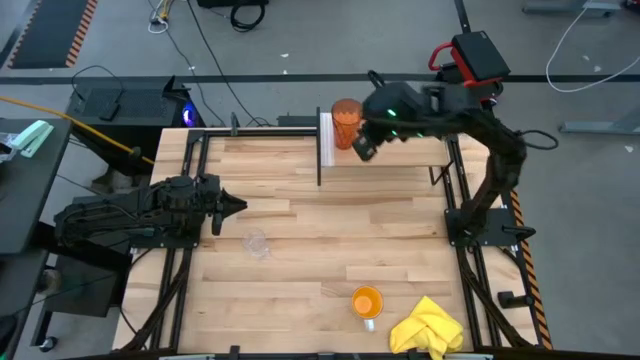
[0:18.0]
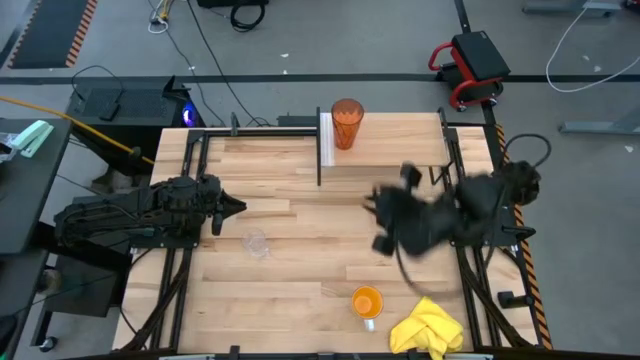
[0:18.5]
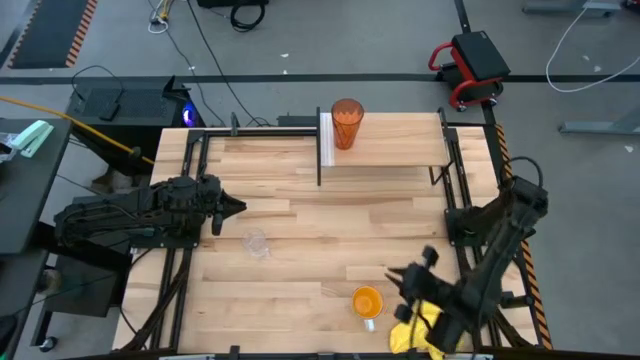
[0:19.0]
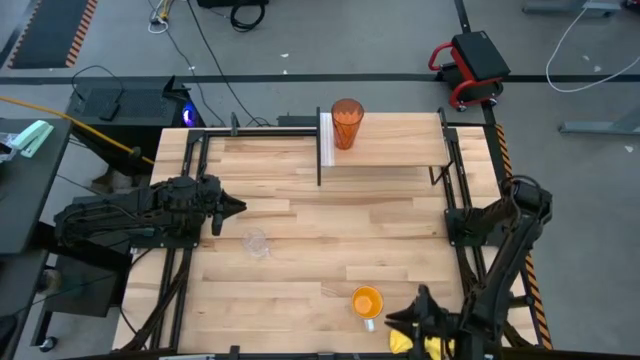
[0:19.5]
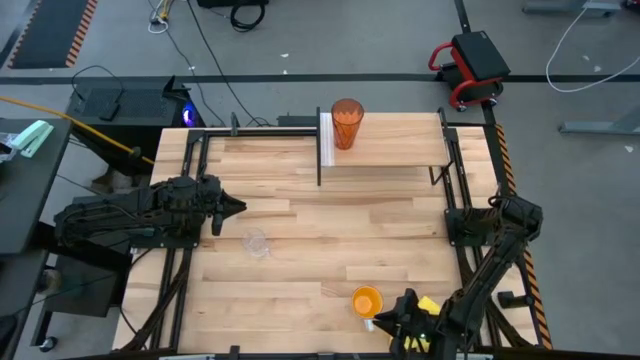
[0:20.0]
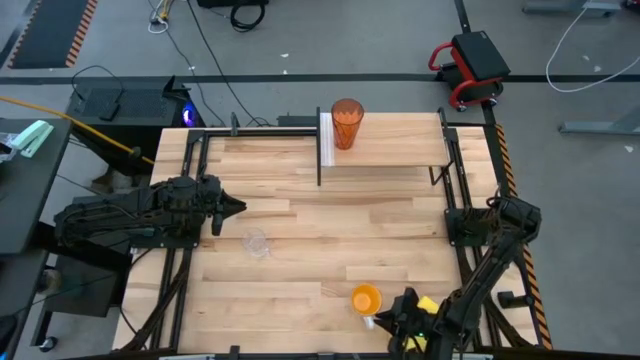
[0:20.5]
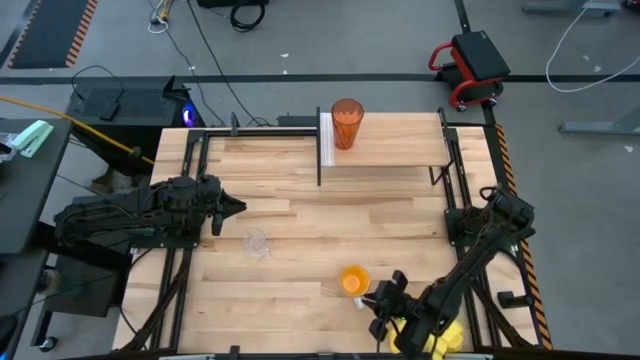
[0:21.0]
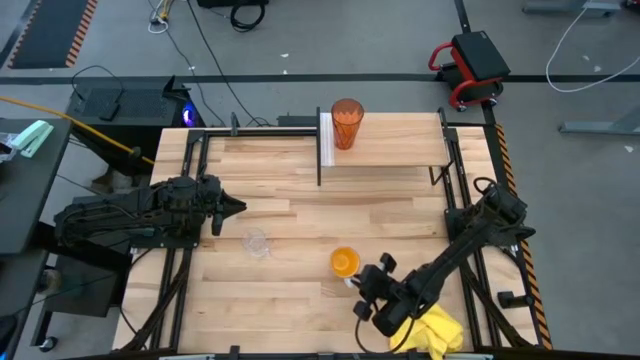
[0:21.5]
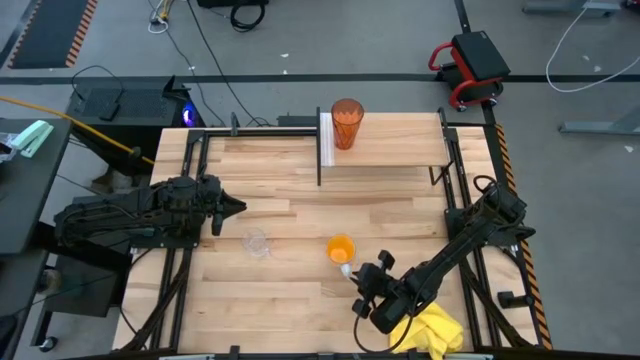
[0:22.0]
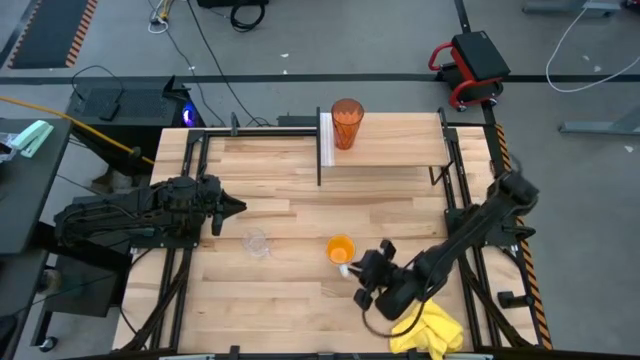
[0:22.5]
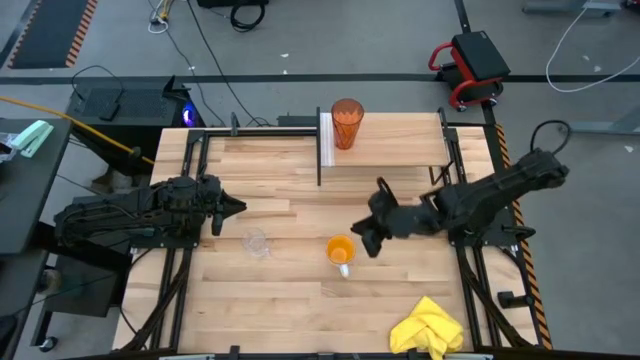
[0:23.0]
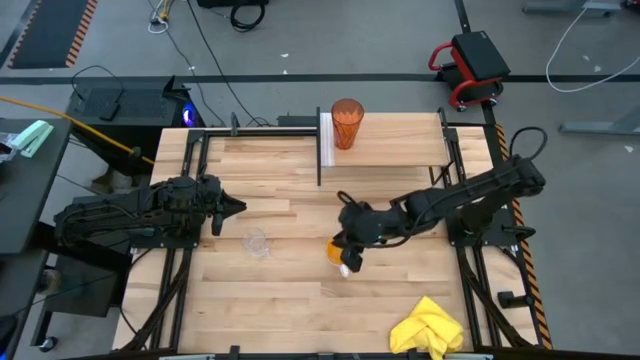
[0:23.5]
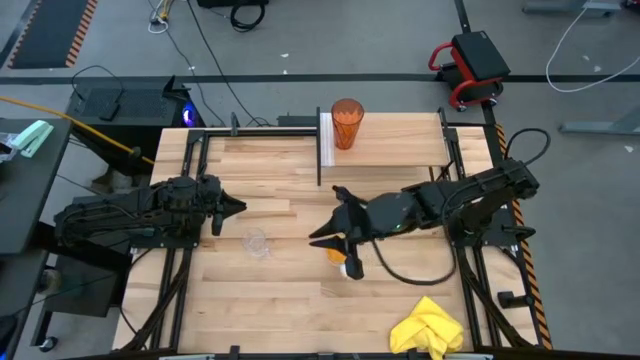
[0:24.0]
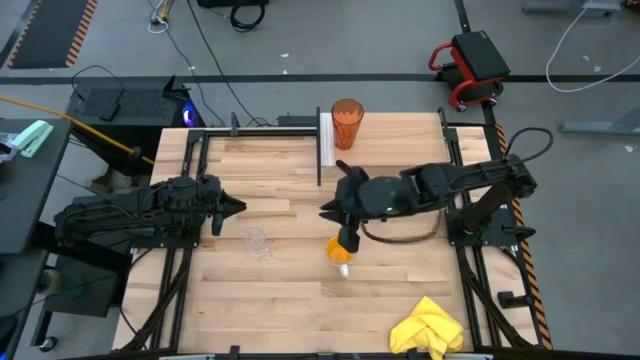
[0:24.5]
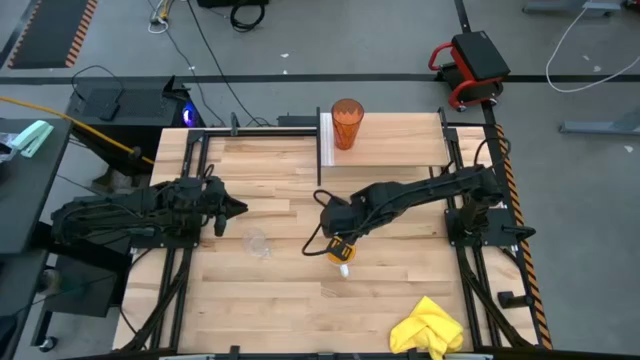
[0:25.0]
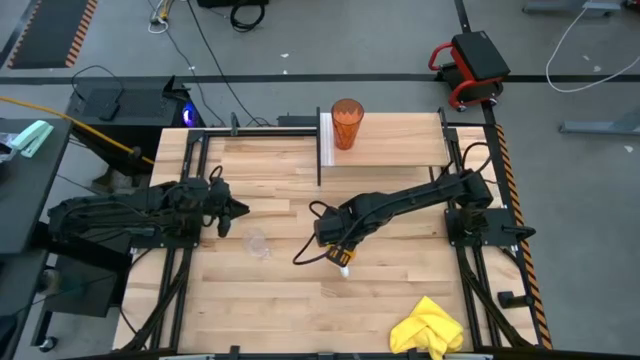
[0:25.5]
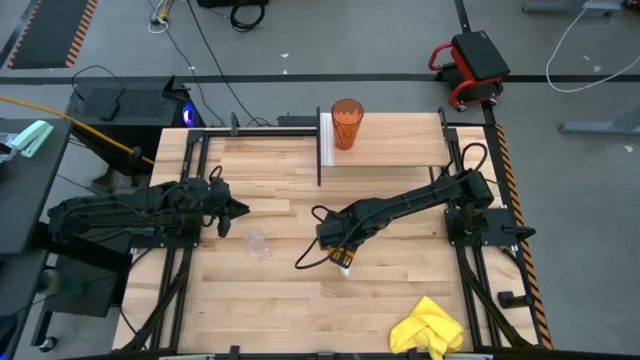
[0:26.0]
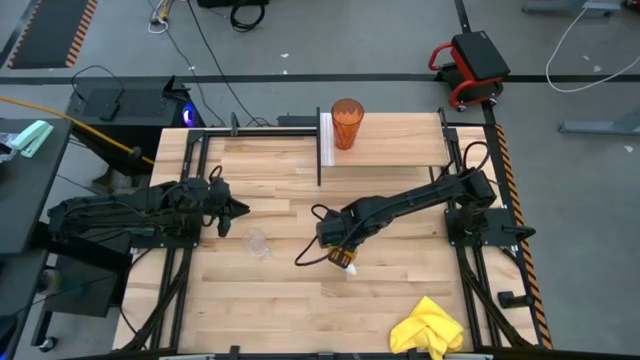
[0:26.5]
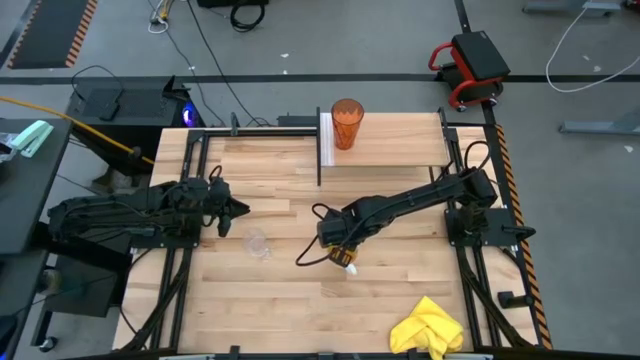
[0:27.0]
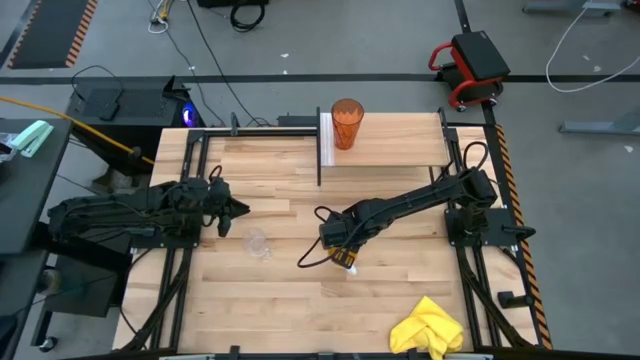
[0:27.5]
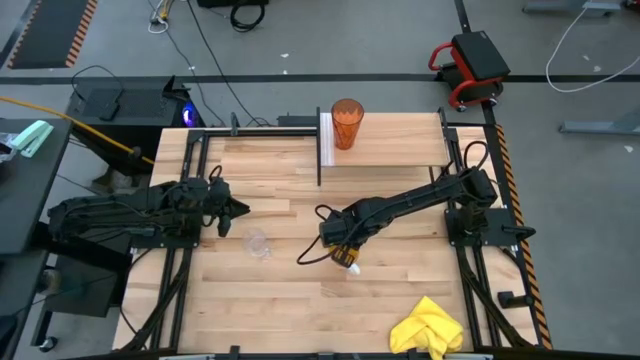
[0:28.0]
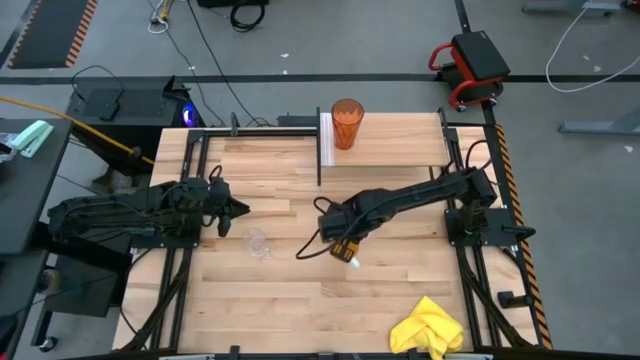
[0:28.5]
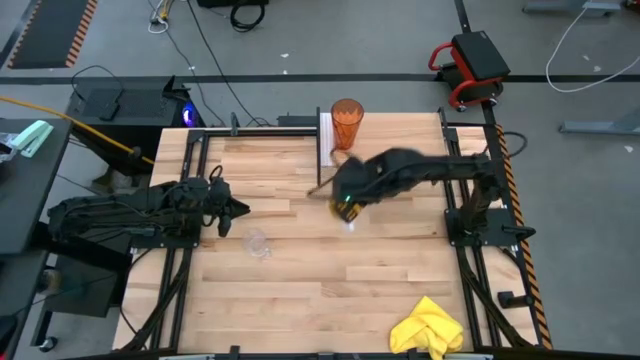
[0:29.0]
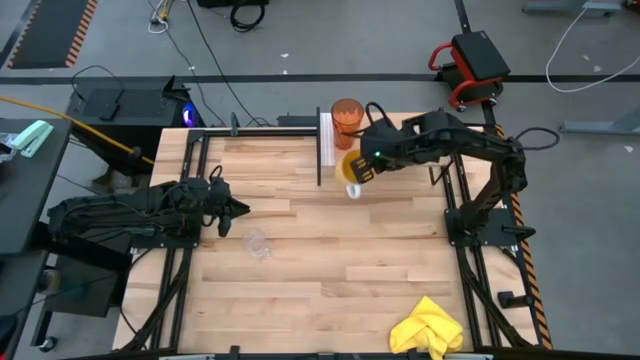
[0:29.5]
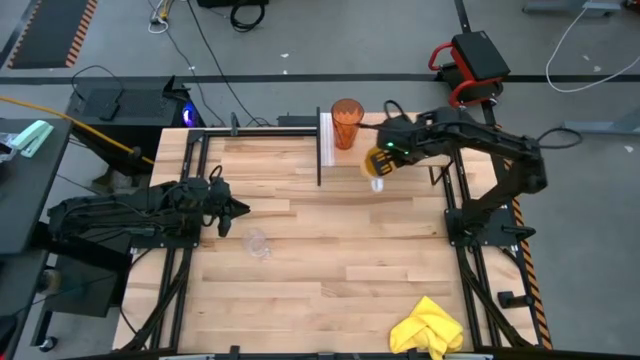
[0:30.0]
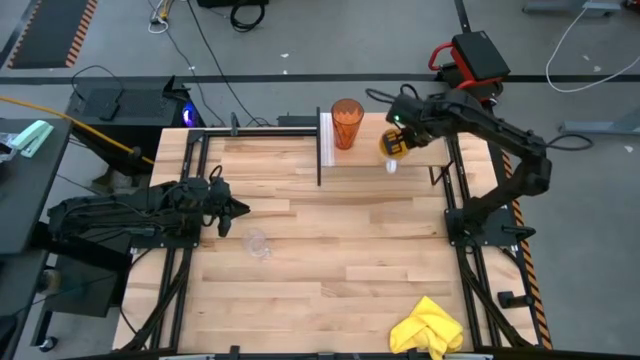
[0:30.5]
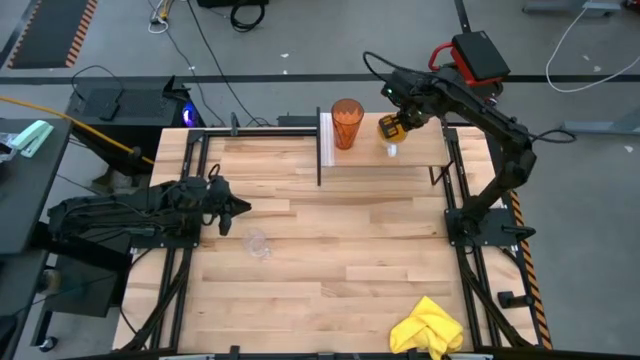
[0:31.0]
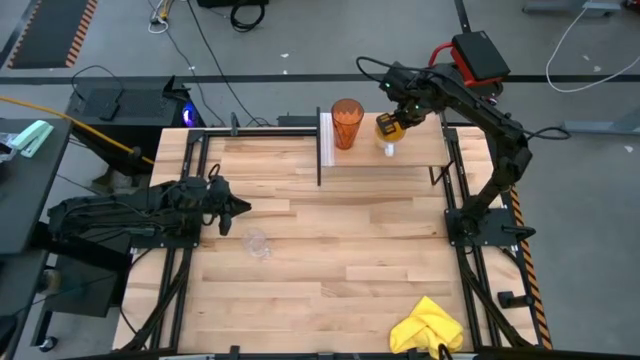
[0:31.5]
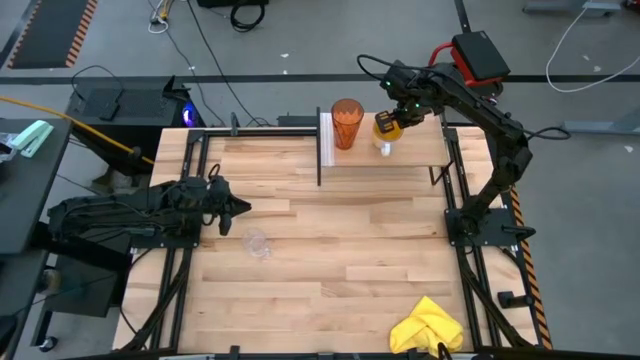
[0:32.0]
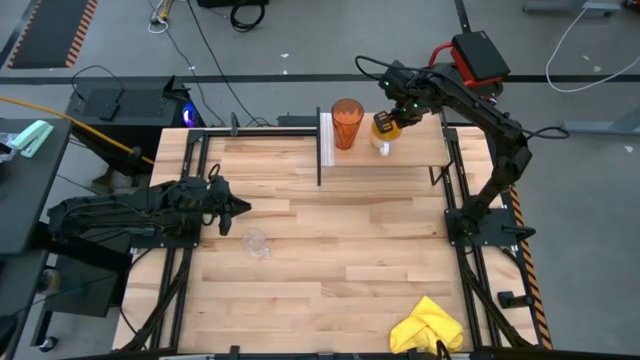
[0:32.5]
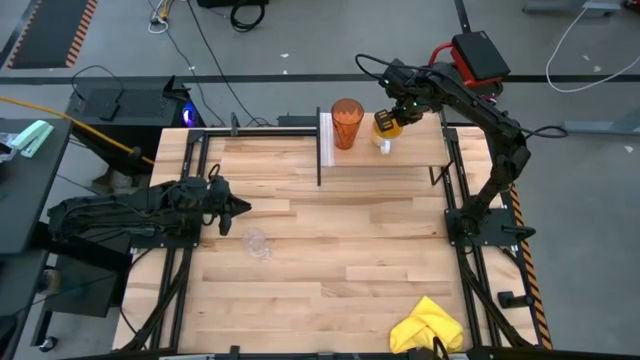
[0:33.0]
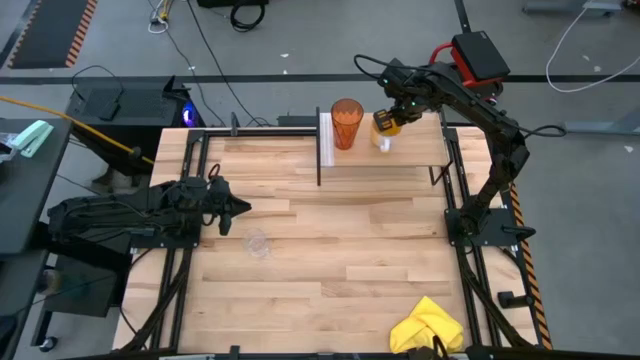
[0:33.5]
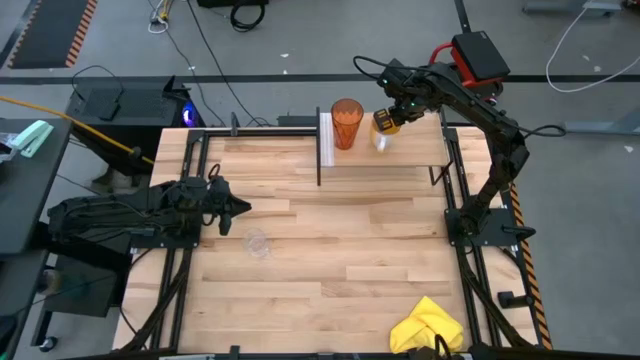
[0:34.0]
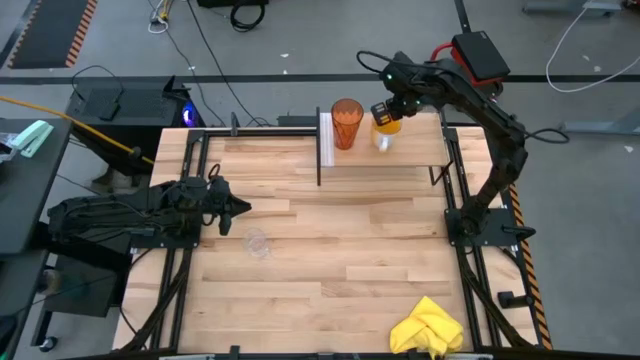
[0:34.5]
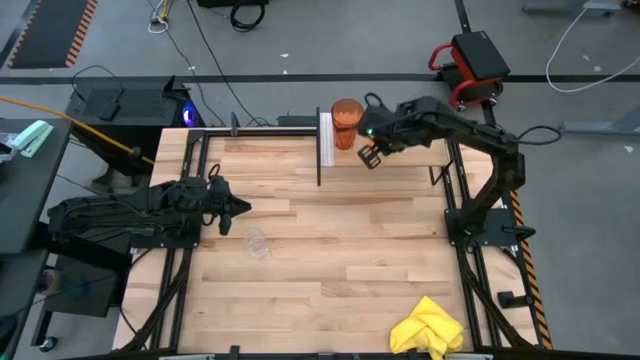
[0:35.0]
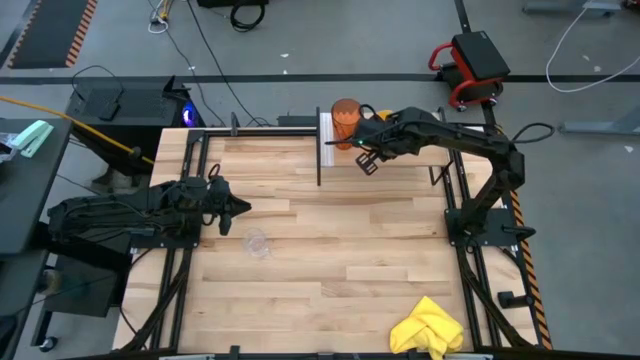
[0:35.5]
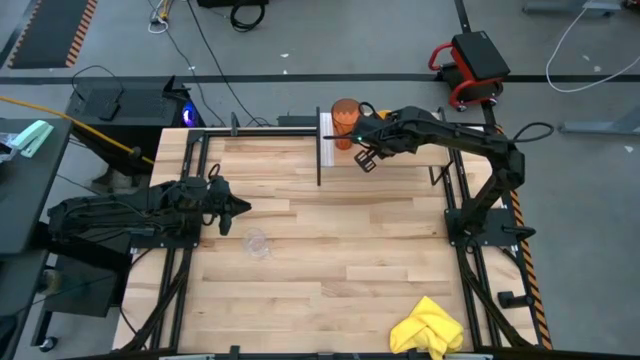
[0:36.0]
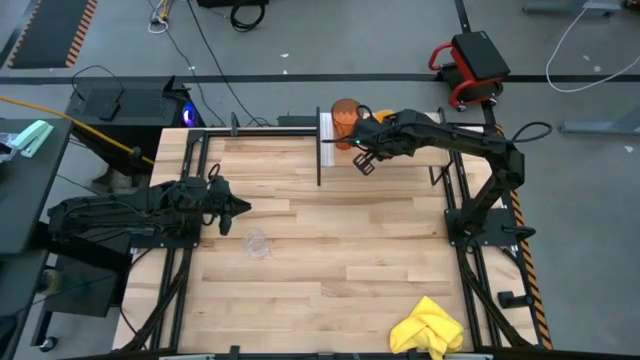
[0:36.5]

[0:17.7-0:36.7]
Task: Stack small to large cups/mugs on shelf
Put the yellow mug on the shelf
